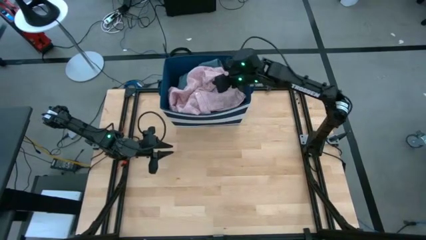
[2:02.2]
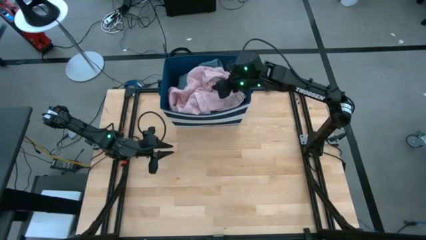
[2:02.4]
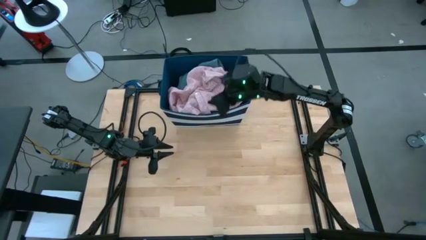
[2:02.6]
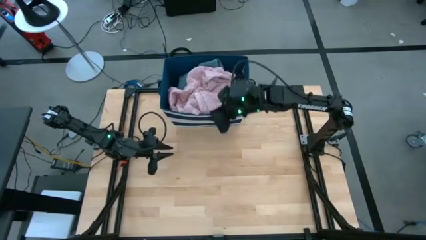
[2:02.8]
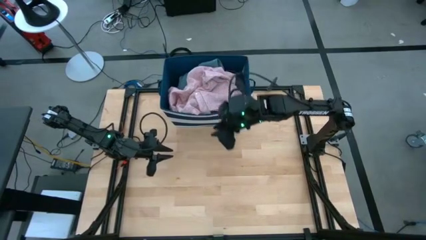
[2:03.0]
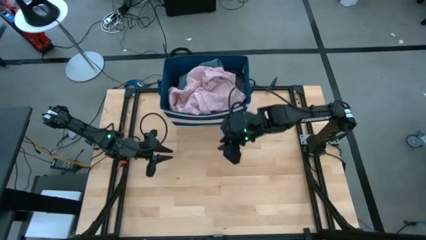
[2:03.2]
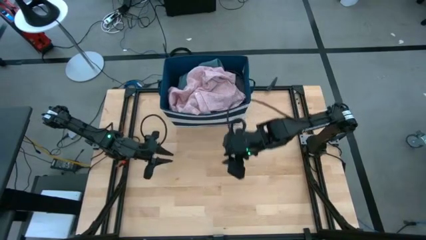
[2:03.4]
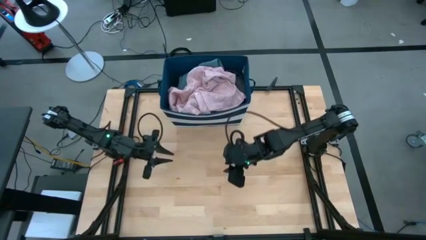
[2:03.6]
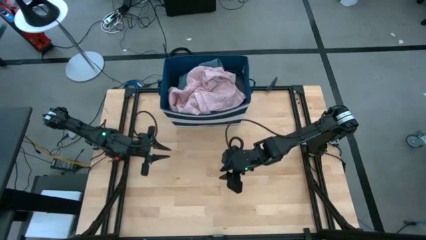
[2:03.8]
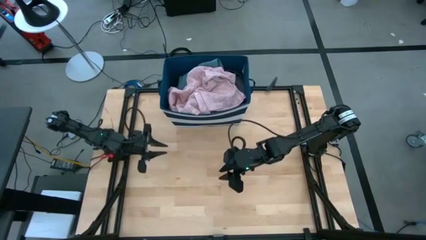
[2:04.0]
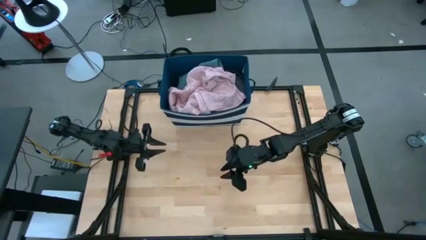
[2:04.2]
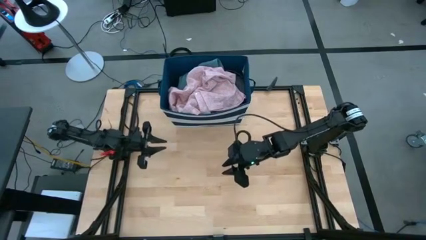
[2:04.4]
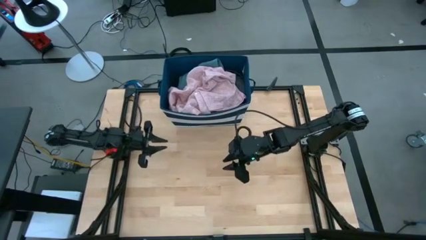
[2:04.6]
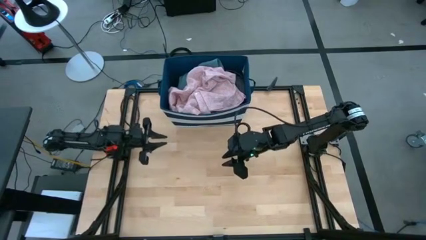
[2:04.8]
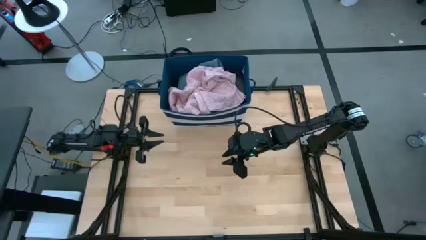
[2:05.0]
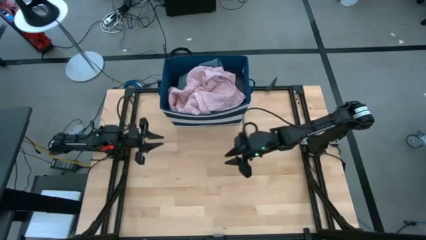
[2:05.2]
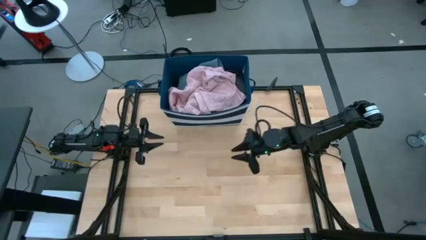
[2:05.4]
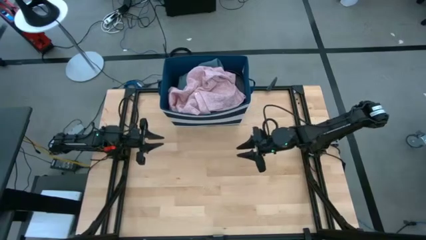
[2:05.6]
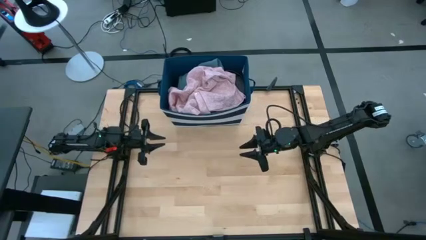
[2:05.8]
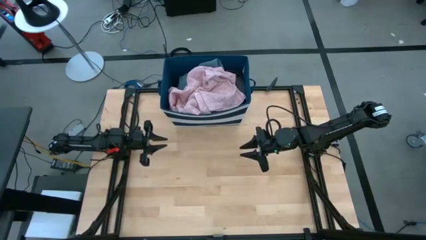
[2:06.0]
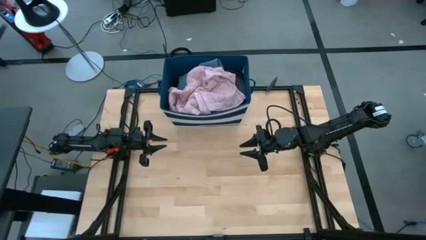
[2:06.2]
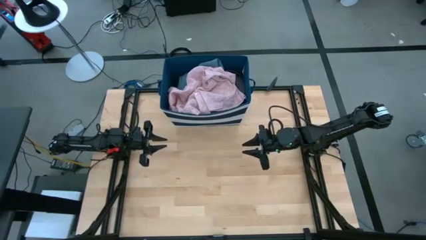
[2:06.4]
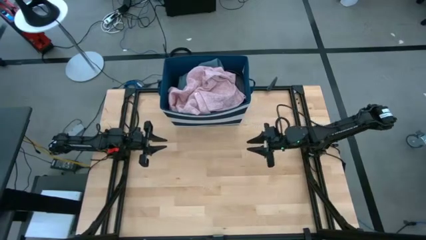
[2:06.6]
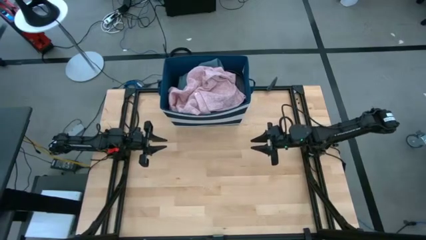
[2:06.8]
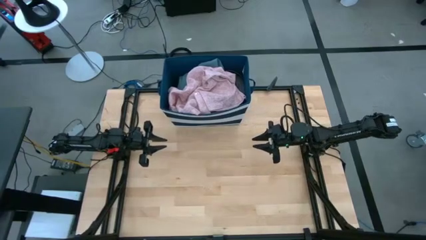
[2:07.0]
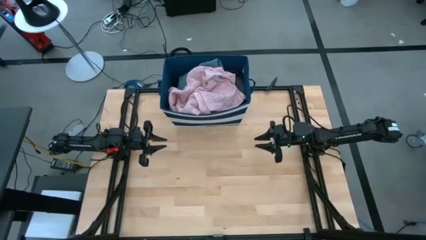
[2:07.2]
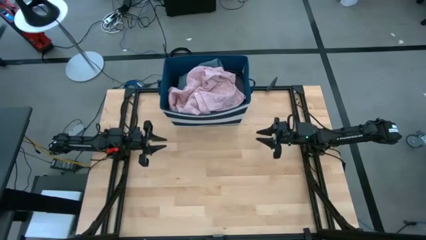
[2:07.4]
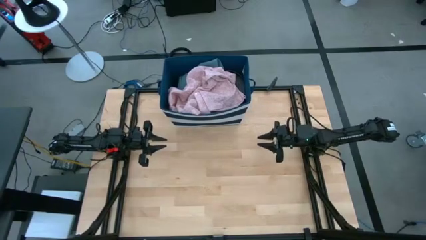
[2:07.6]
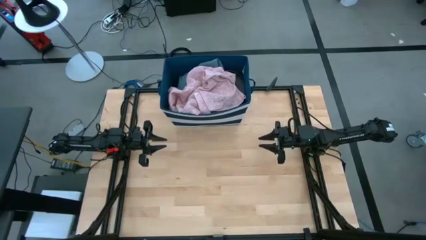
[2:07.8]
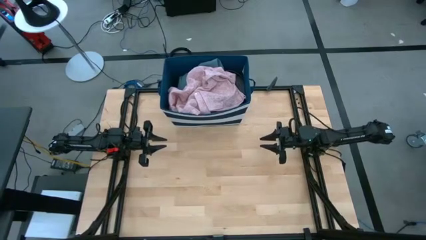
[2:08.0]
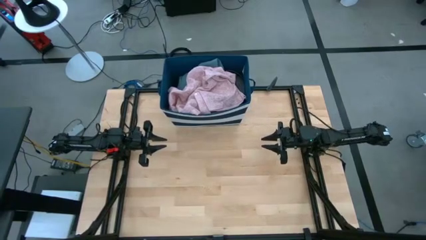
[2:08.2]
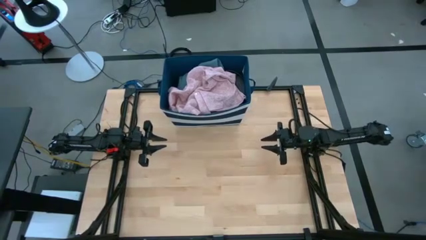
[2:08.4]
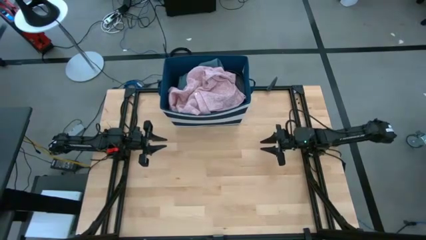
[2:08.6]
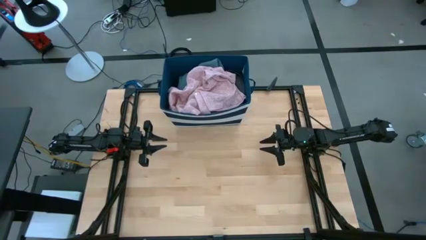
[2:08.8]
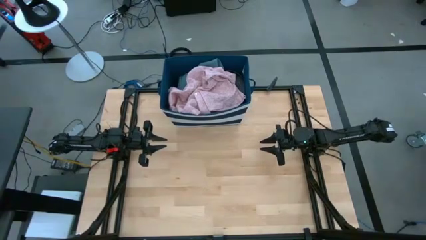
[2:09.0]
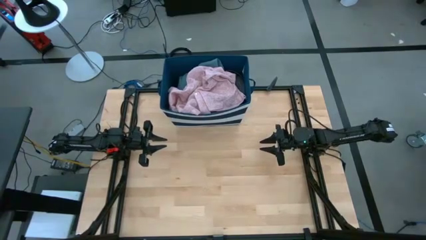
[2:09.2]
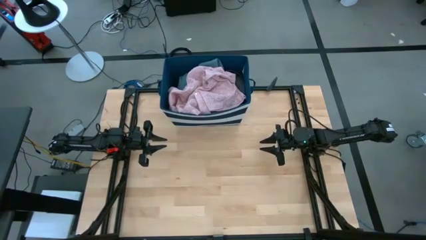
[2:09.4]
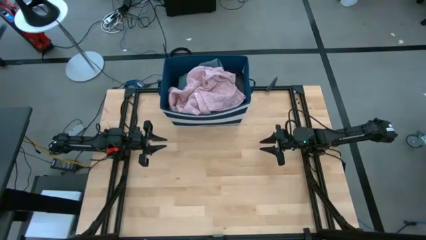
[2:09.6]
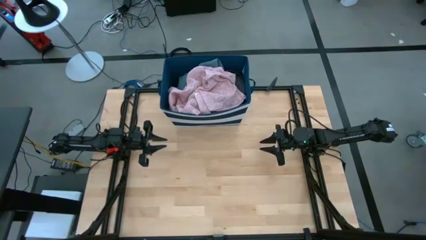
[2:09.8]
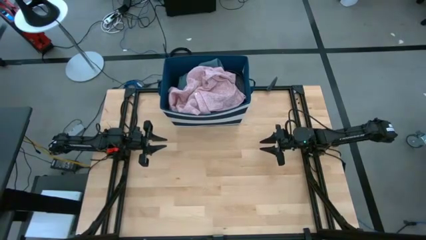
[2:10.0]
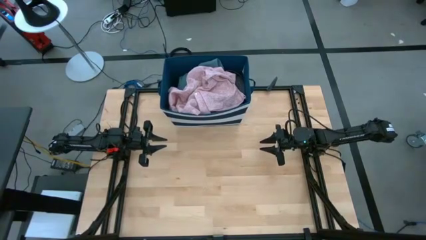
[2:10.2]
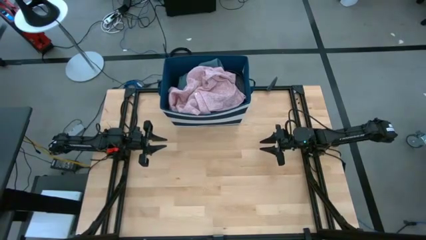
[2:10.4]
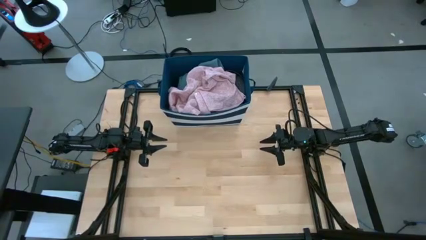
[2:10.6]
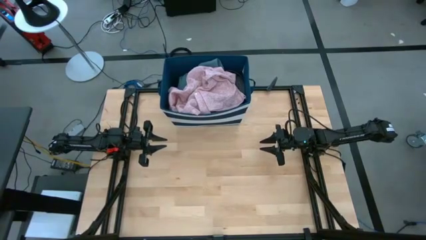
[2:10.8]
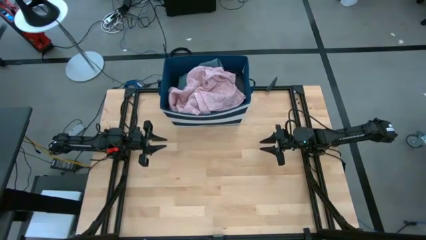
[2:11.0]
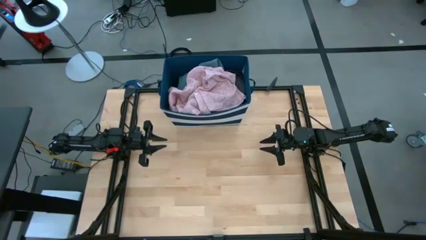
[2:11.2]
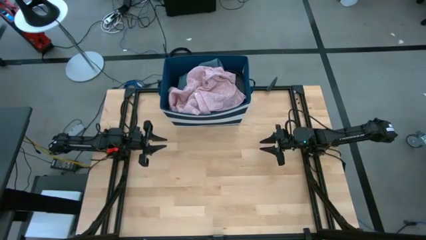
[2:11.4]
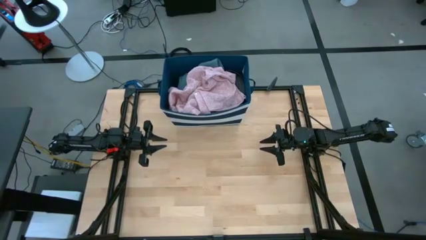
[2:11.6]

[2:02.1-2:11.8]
Task: Sort clothes
Return to Home Position

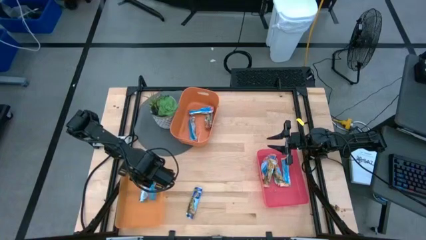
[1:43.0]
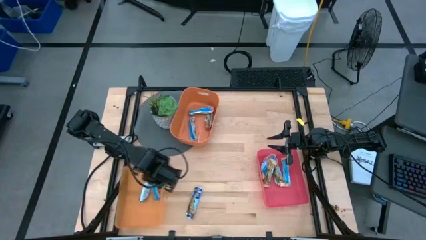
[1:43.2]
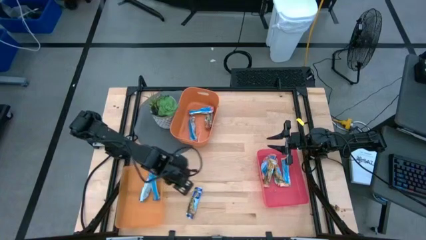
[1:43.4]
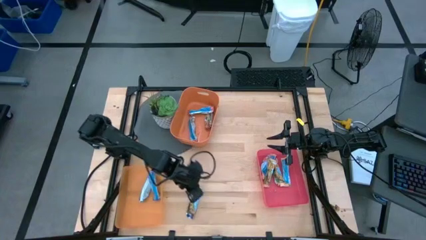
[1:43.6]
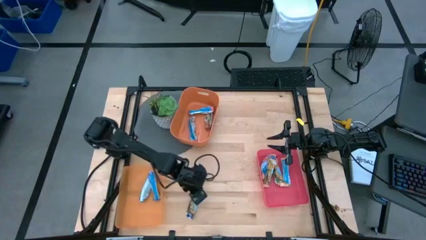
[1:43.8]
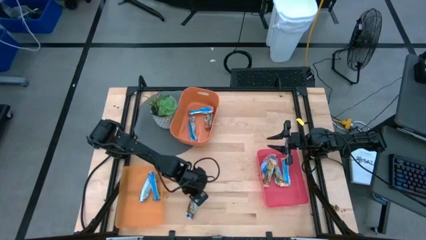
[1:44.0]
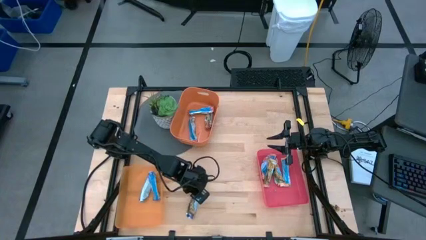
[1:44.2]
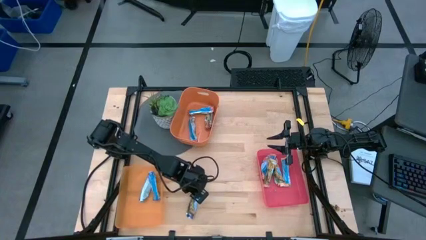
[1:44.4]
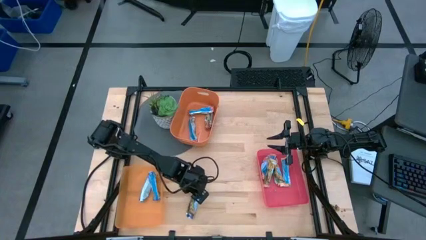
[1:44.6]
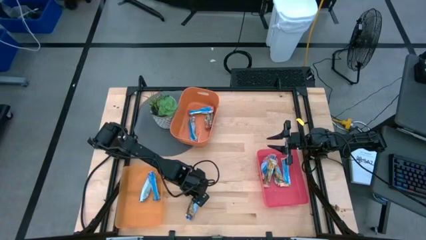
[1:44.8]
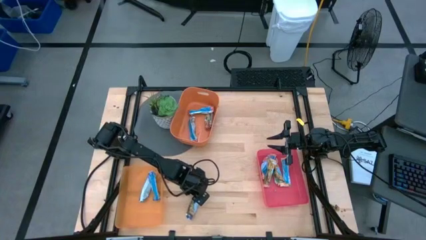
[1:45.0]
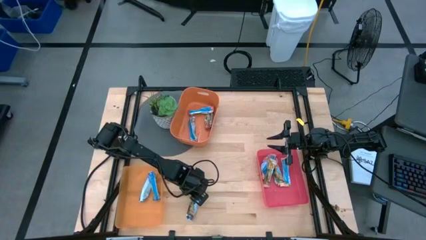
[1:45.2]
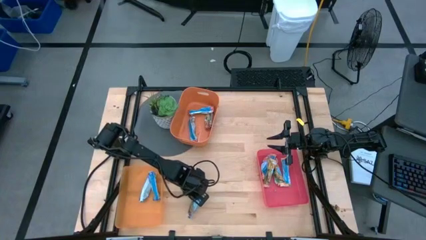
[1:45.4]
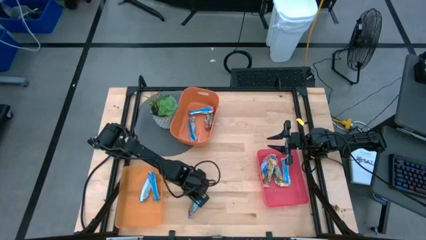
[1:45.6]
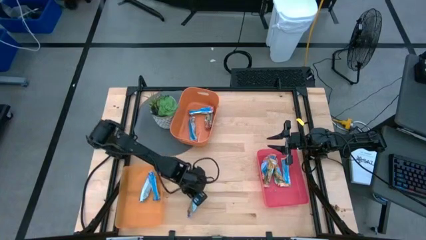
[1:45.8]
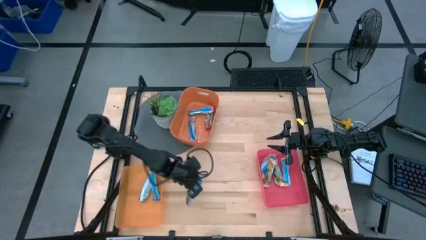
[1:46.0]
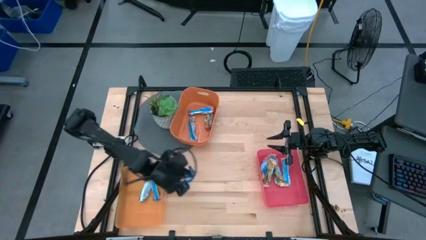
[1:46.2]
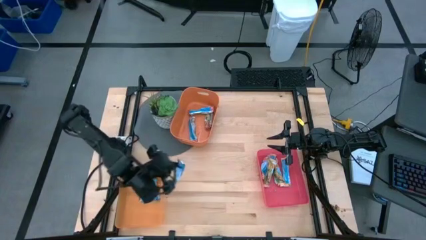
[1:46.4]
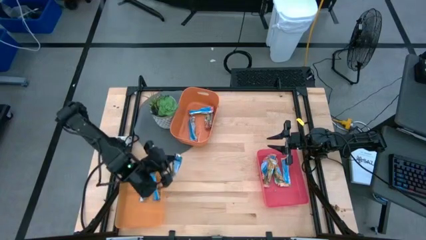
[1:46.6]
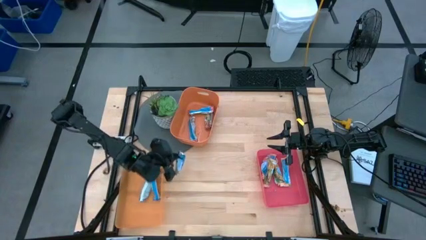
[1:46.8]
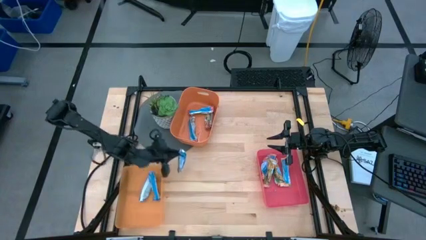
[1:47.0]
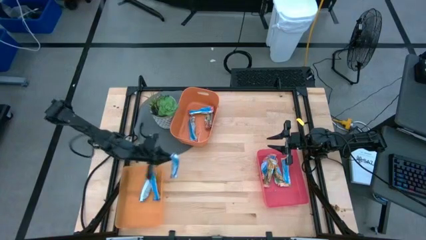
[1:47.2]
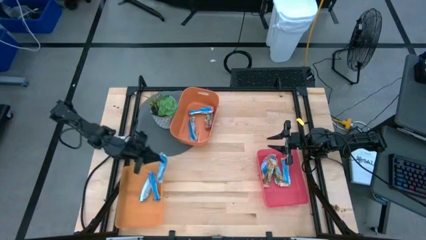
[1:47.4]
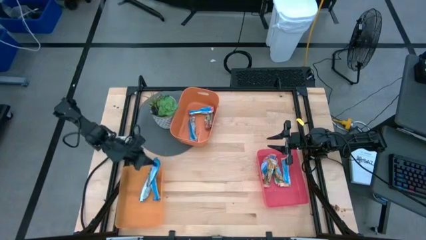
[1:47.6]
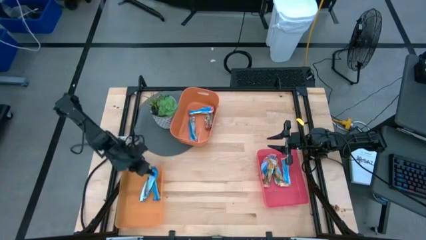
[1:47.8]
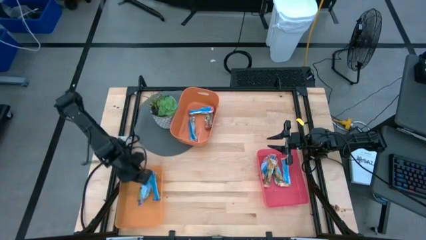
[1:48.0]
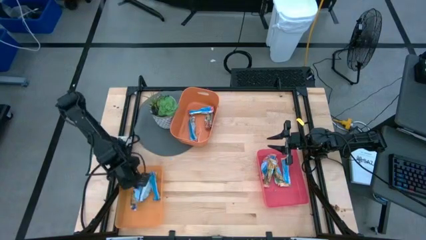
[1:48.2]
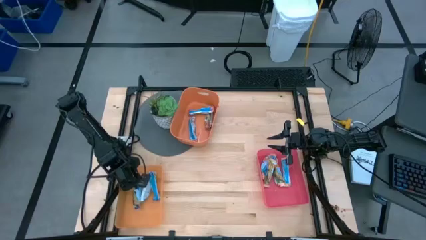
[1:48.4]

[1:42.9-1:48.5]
Task: Pick and place Granola Bars by type
Put the blue granola bar into the light orange bin
